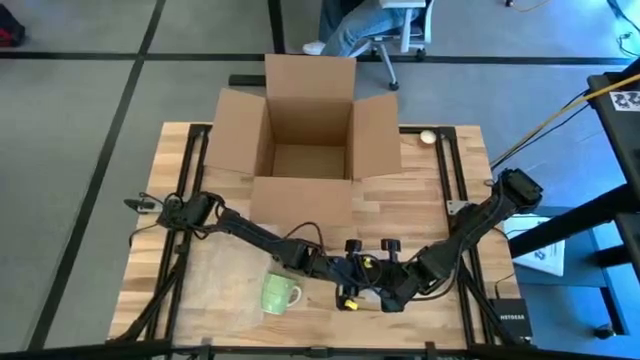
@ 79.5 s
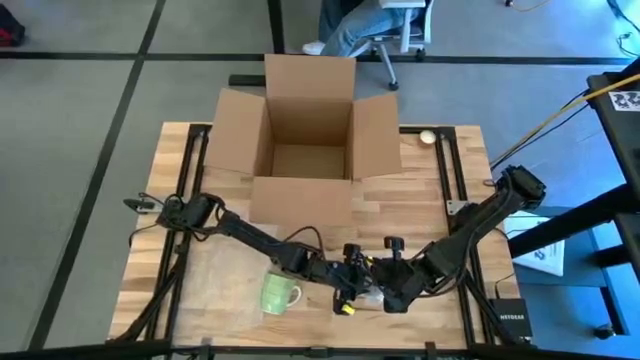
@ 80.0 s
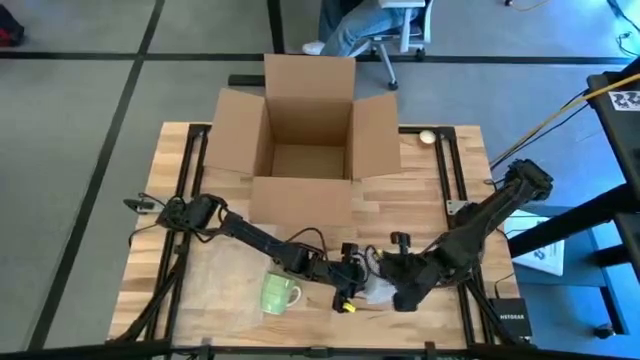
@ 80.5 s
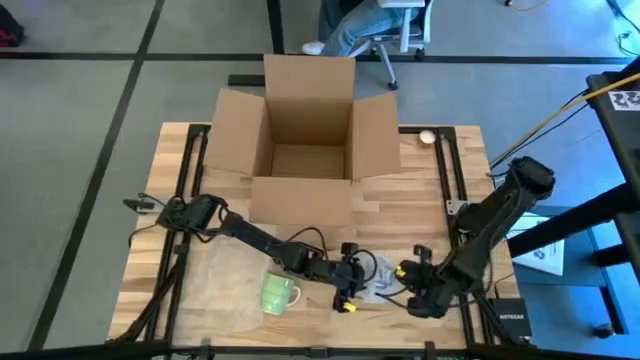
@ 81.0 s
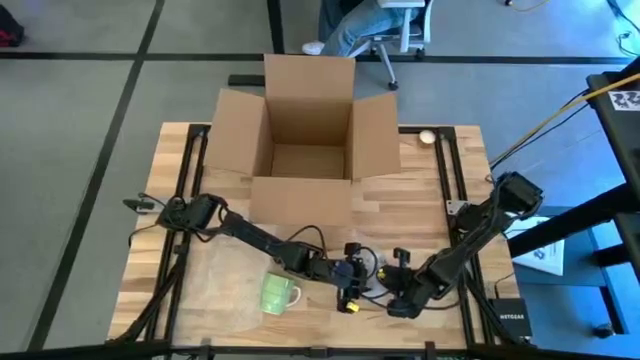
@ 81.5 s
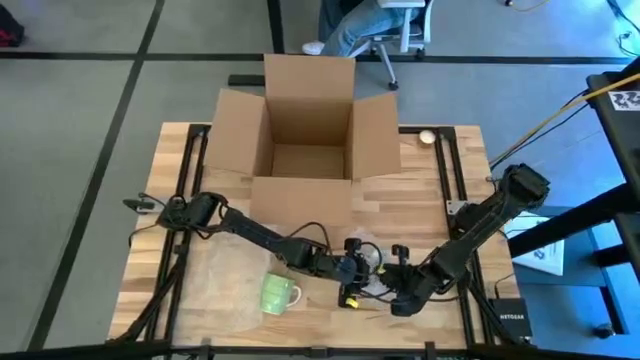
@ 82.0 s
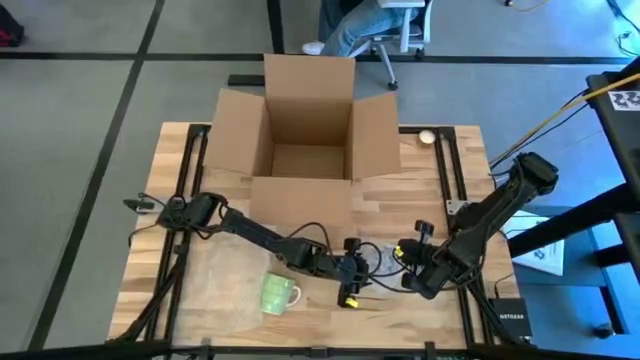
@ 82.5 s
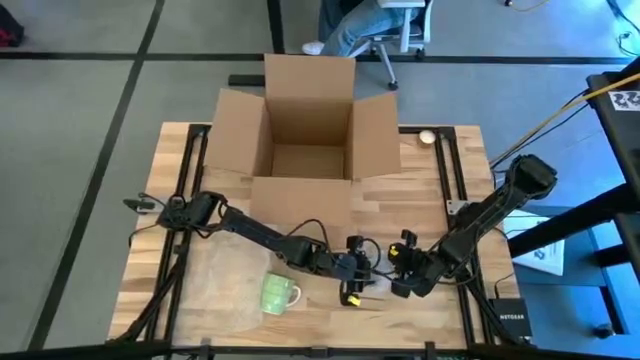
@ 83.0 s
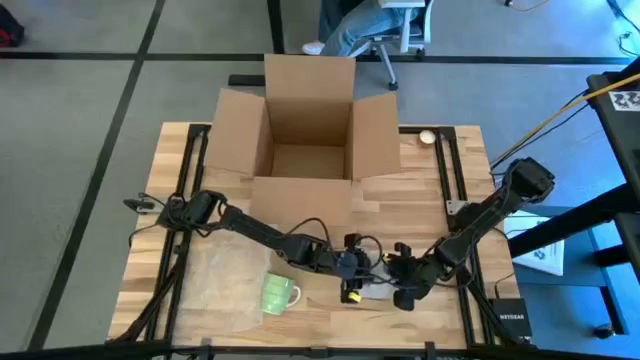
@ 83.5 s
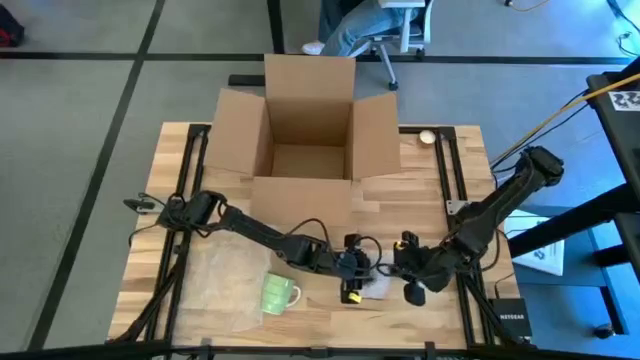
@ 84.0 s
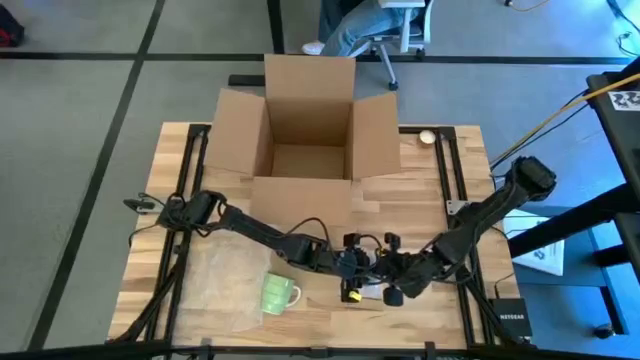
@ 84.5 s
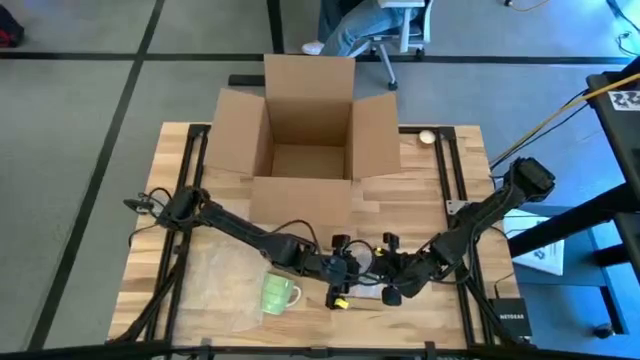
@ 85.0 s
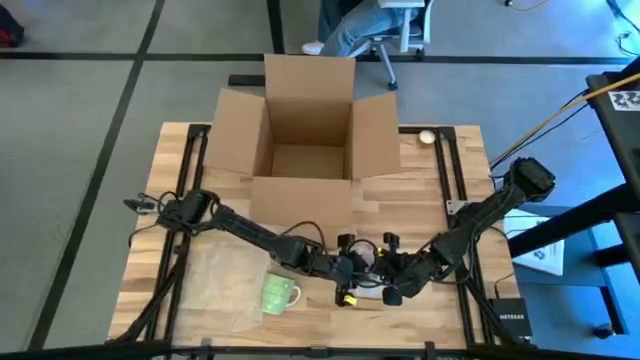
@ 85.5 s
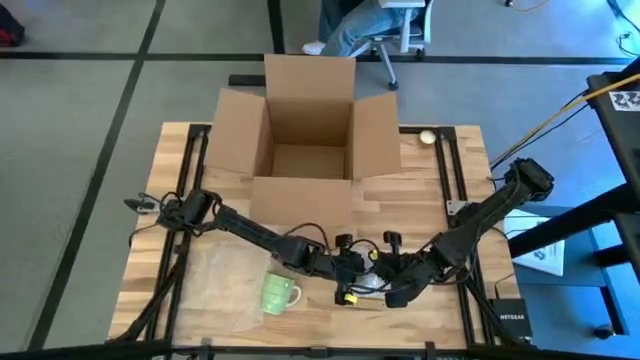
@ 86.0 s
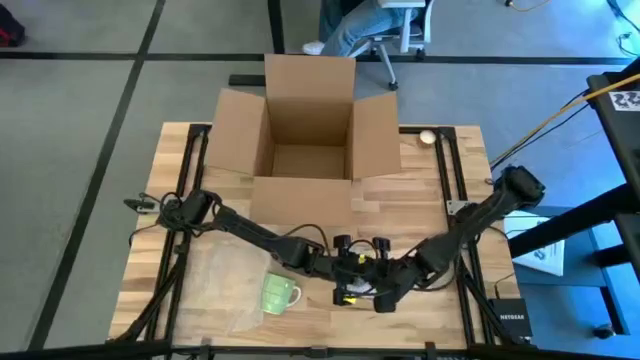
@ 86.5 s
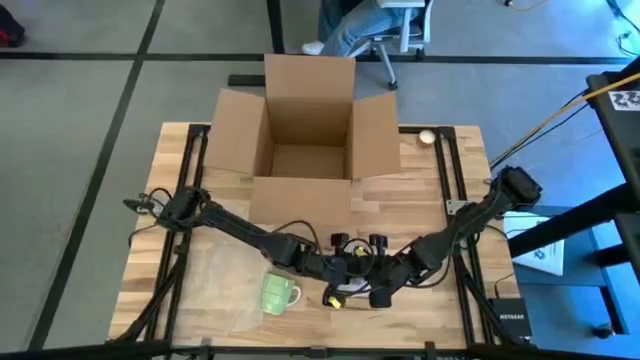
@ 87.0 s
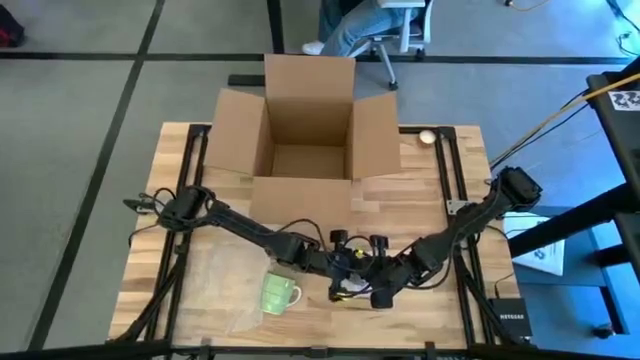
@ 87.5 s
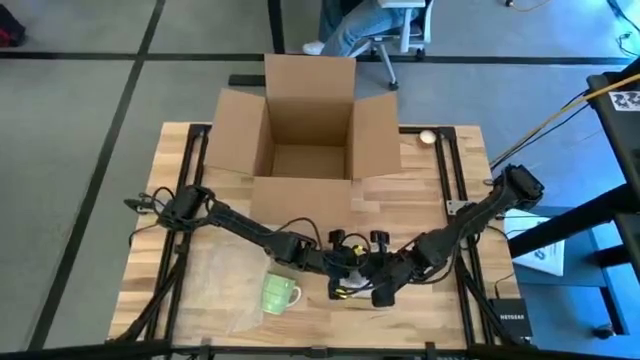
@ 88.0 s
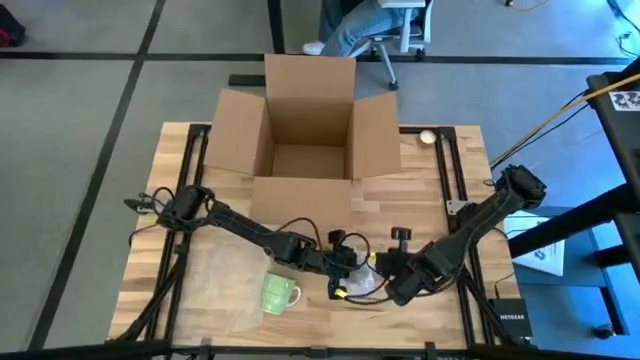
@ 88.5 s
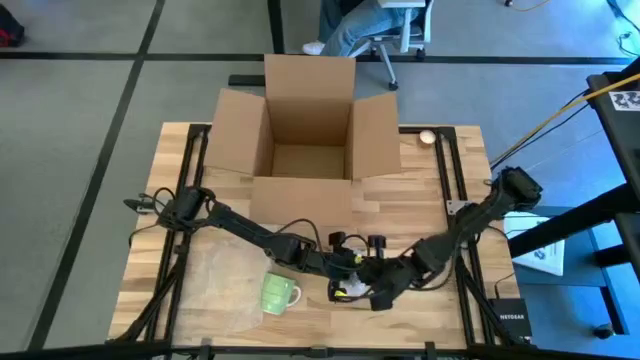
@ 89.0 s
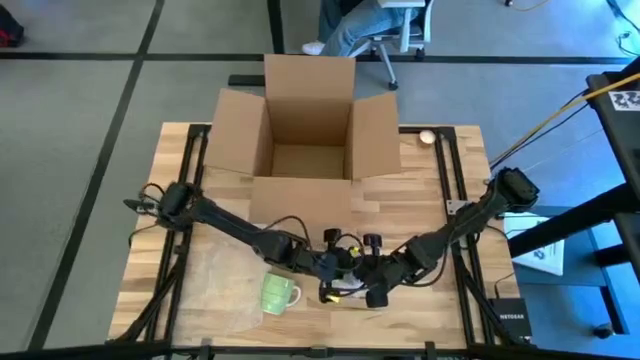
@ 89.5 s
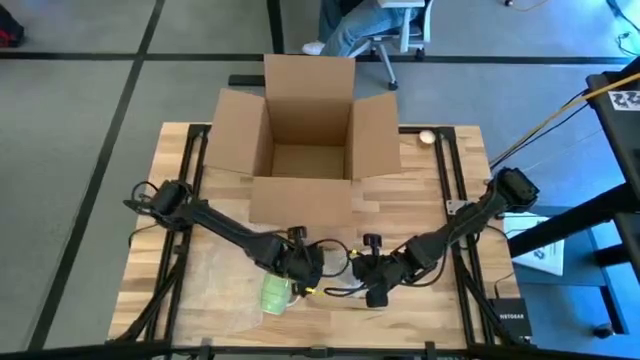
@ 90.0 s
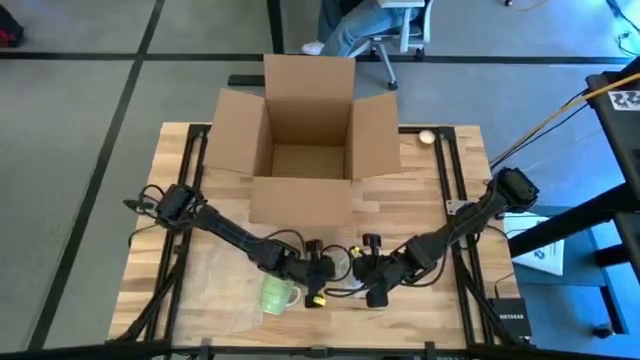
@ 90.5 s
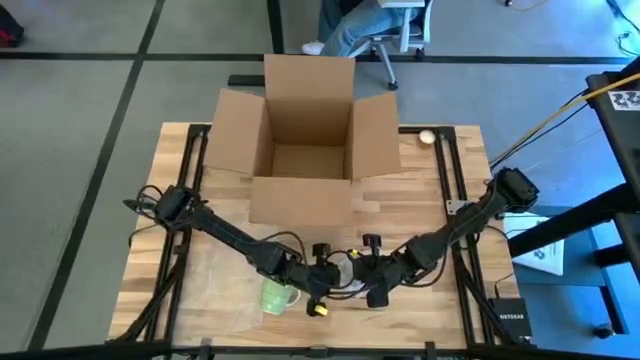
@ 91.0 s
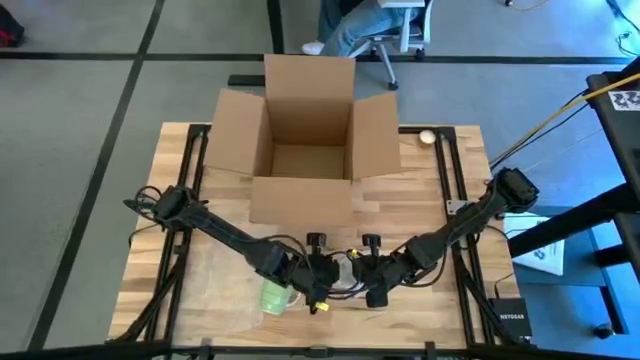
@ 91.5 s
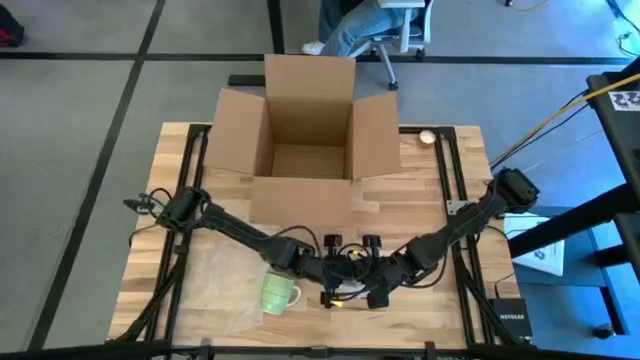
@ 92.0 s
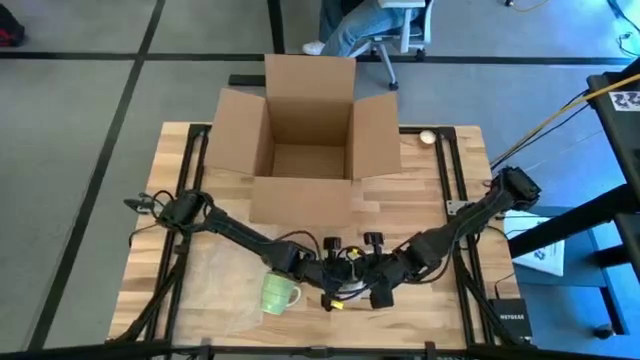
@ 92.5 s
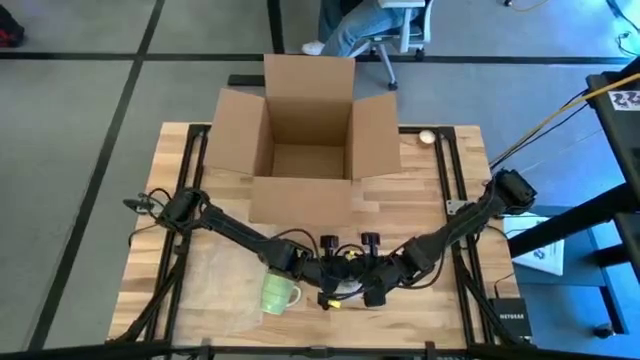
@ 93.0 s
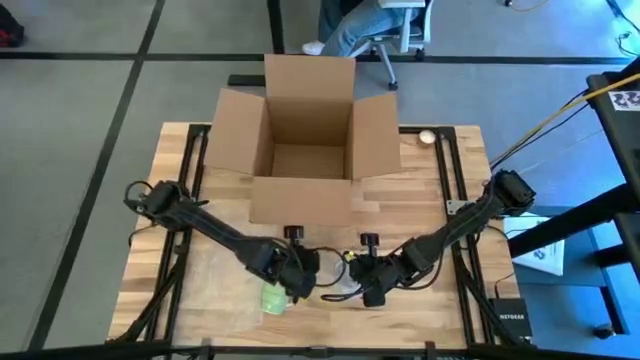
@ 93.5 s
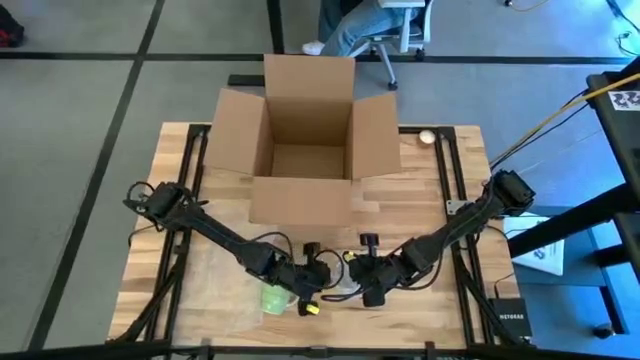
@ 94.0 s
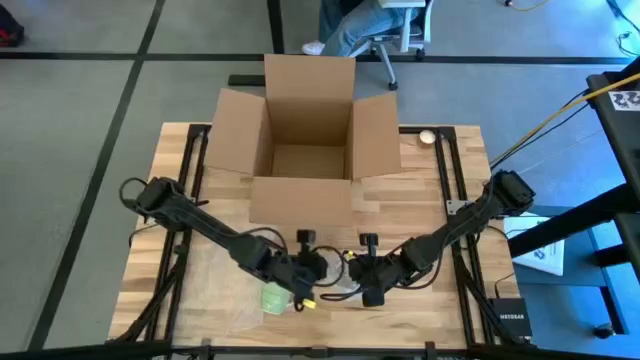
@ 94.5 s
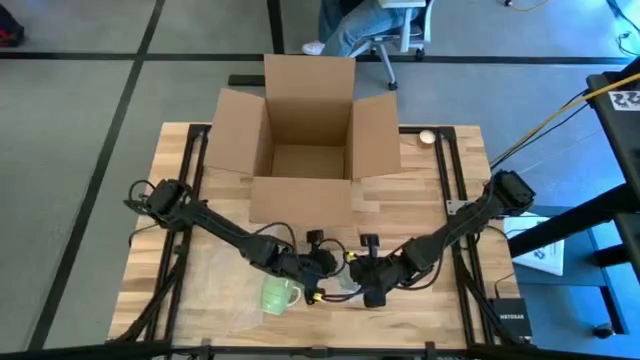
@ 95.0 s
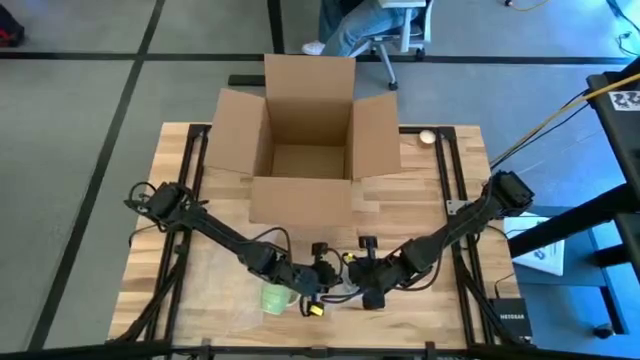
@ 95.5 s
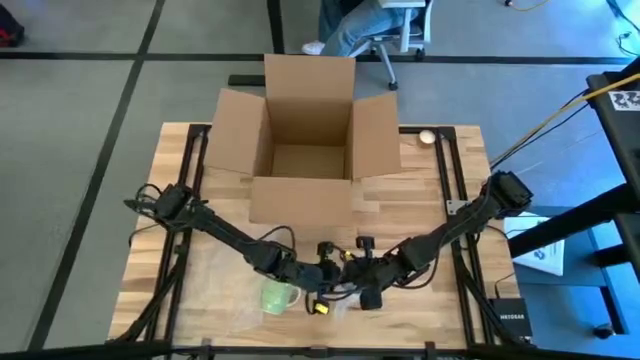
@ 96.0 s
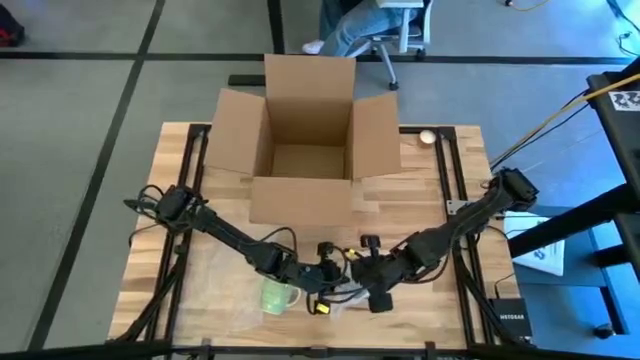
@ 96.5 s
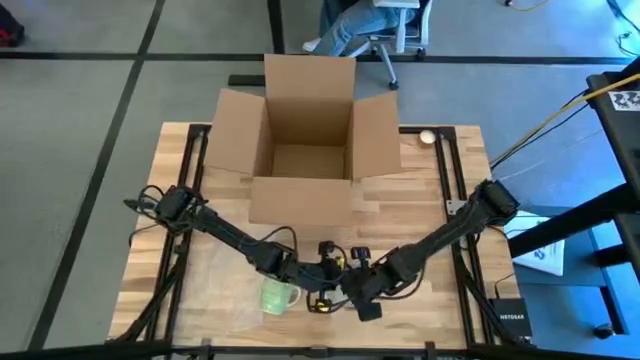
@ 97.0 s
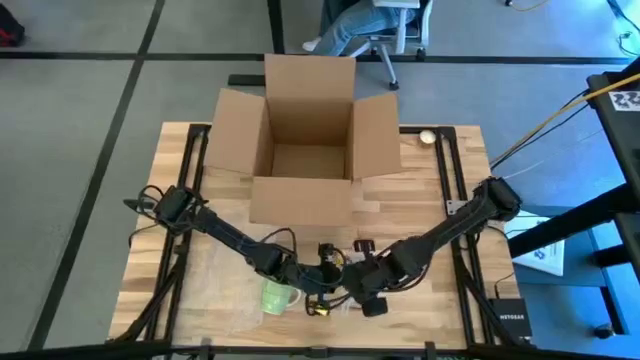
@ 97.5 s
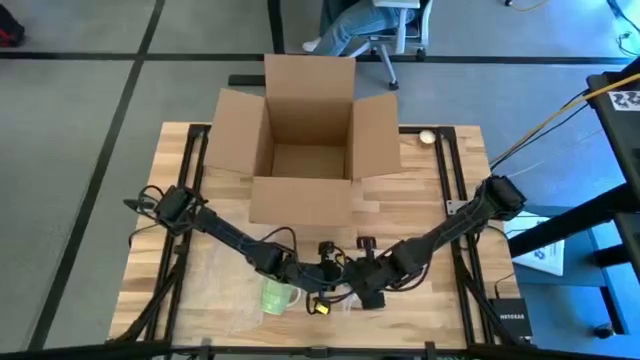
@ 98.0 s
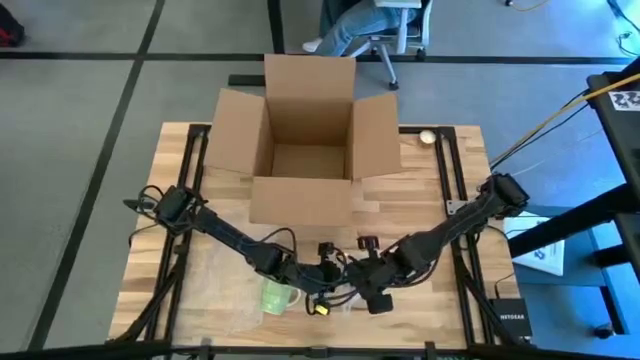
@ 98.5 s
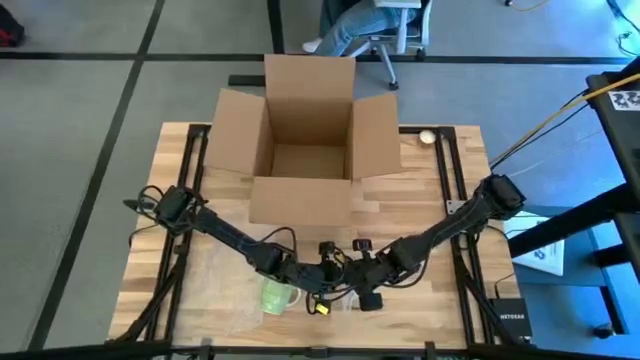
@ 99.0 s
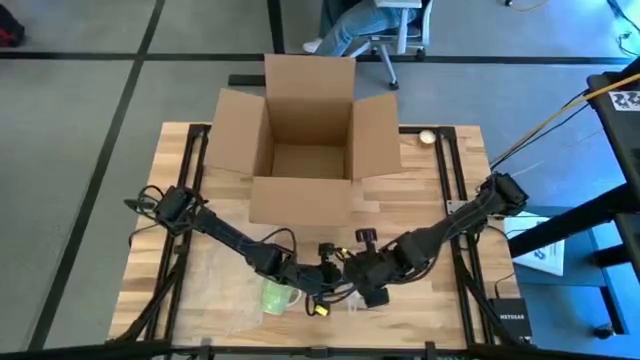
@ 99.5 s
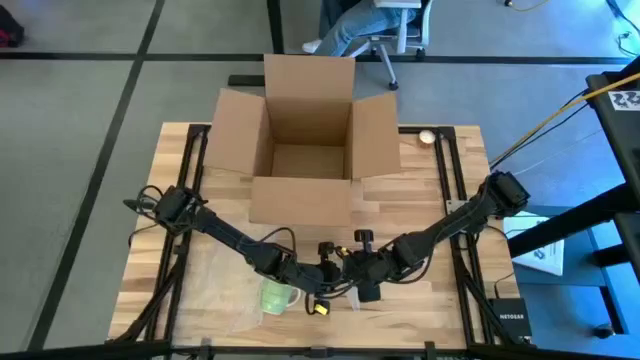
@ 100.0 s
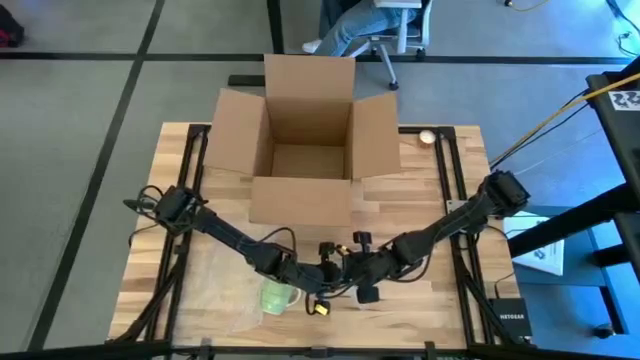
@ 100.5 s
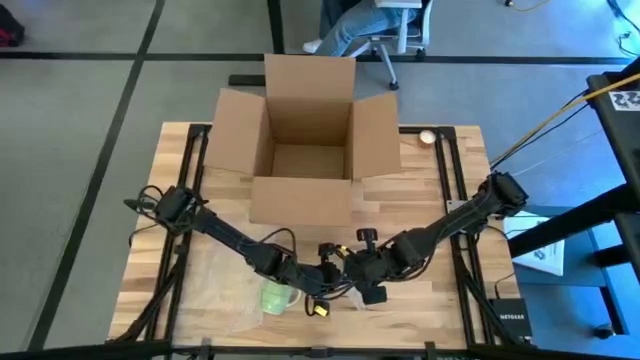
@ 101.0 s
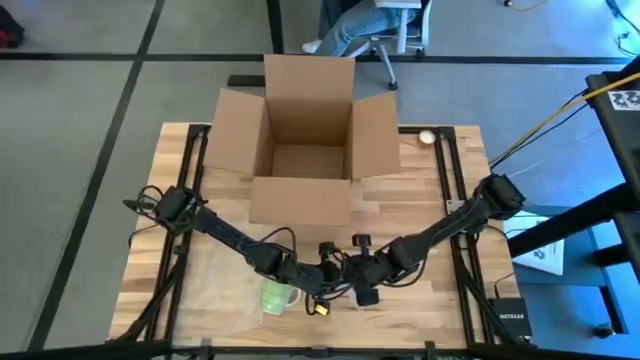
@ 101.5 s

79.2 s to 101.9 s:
Task: wrap mug
Wrap the blue mug with the right transparent bubble wrap
